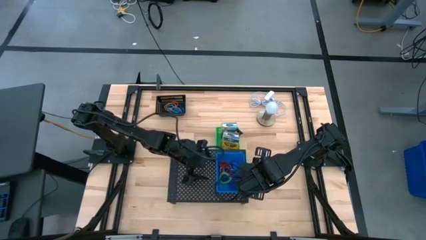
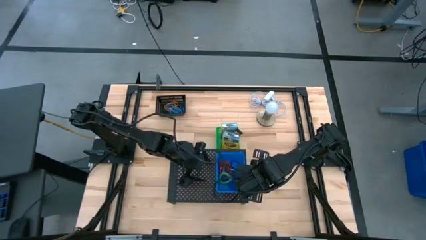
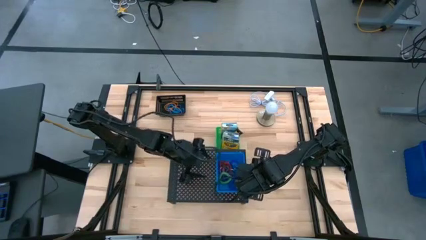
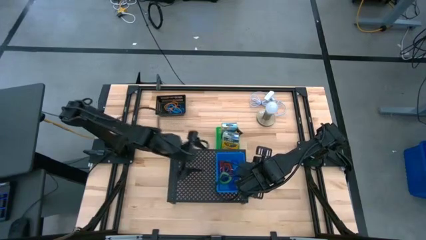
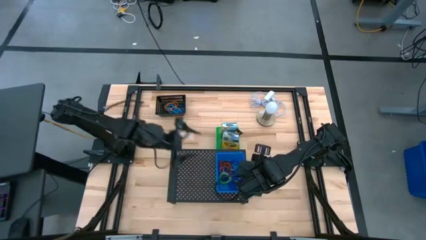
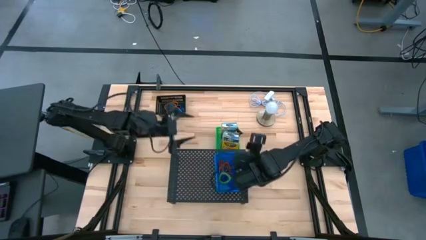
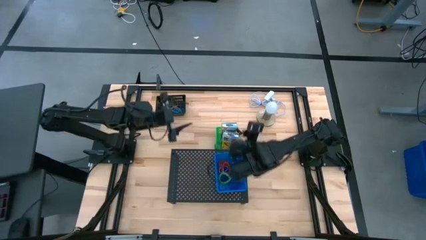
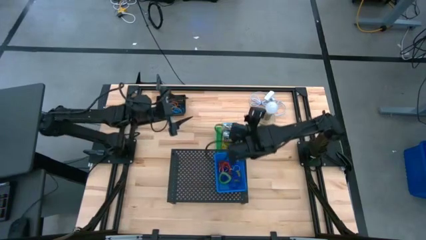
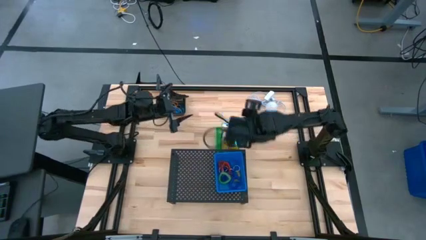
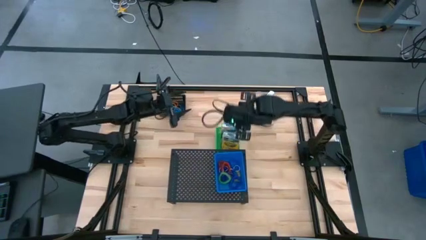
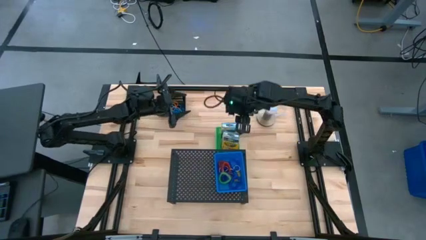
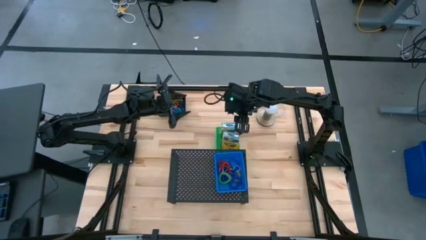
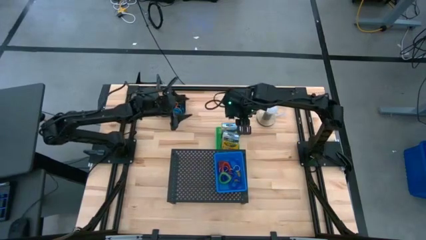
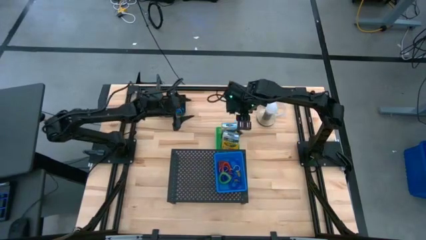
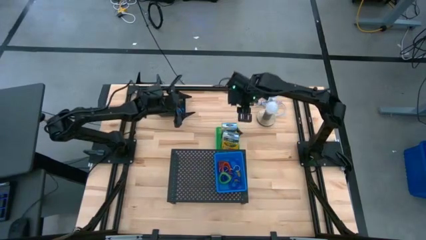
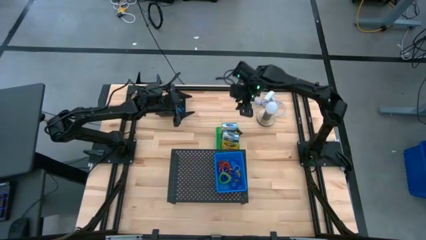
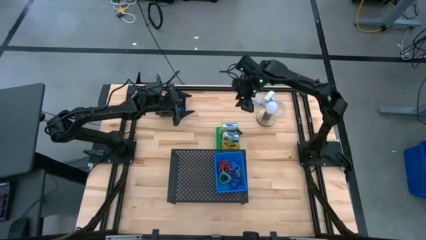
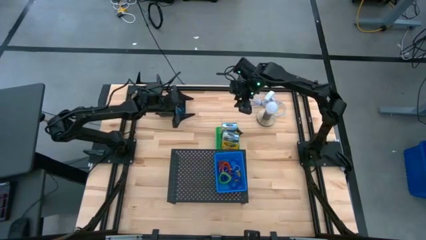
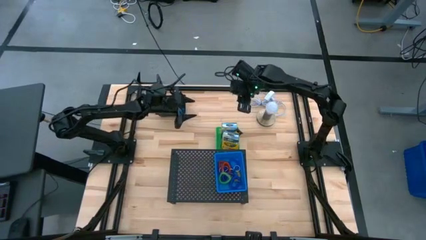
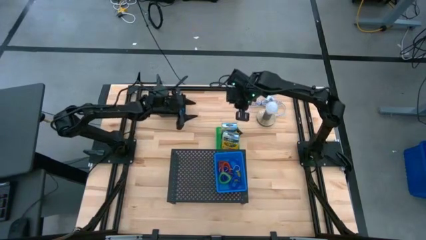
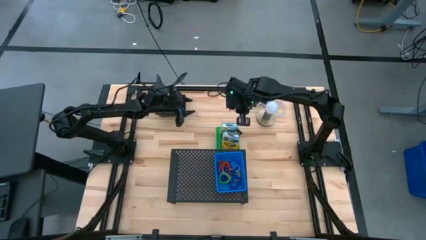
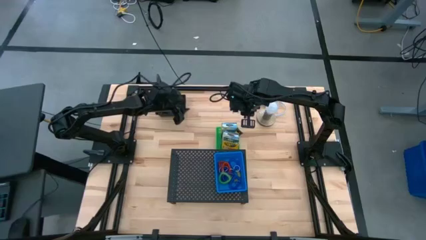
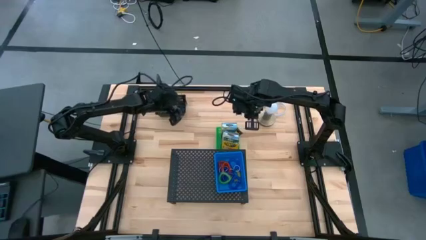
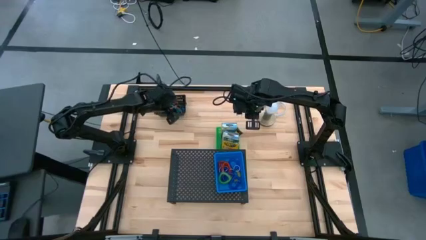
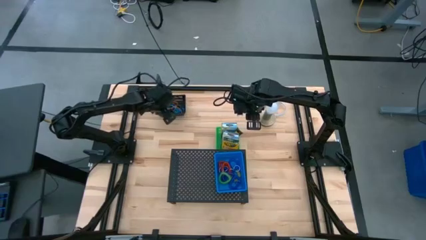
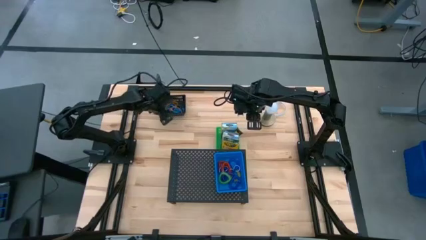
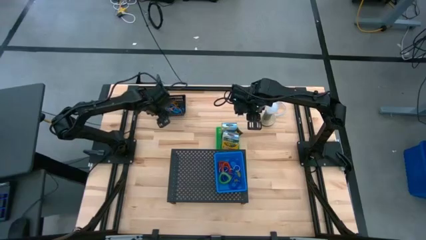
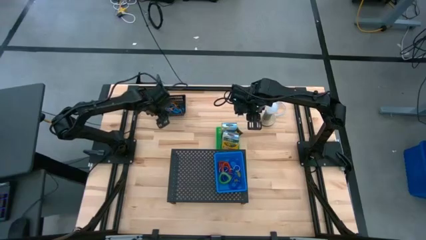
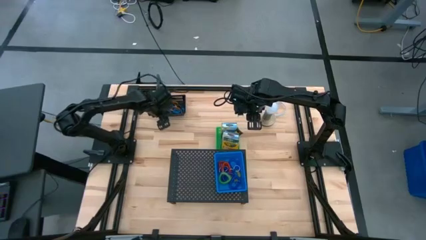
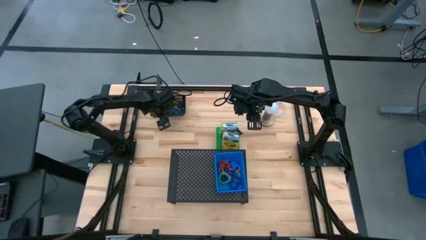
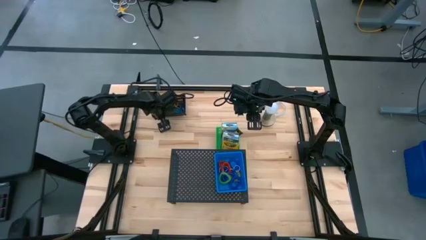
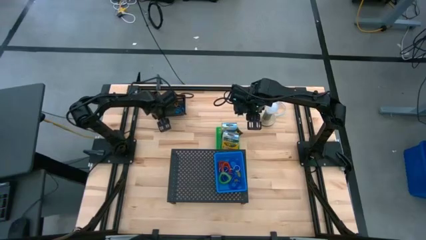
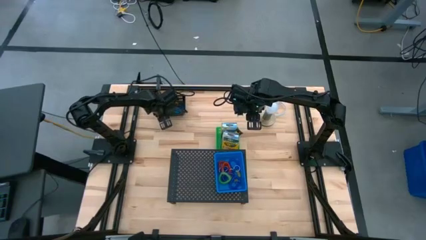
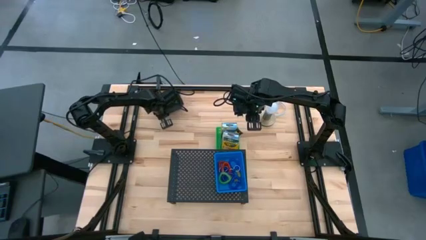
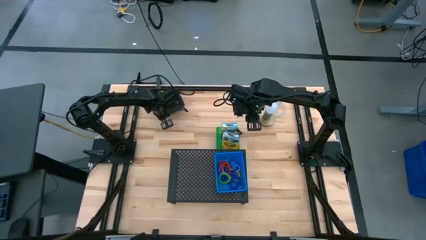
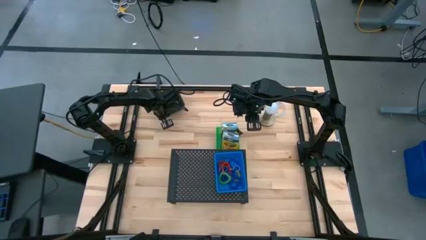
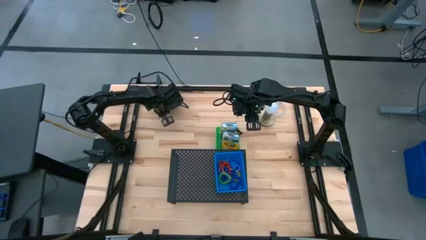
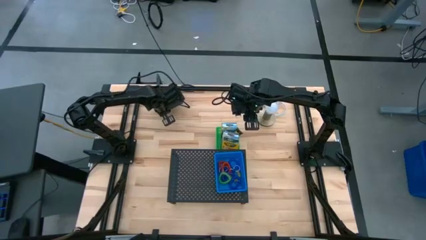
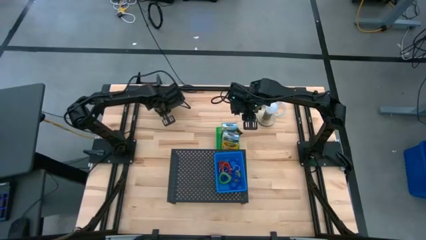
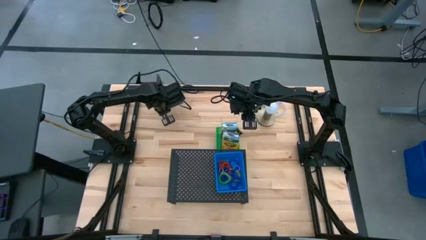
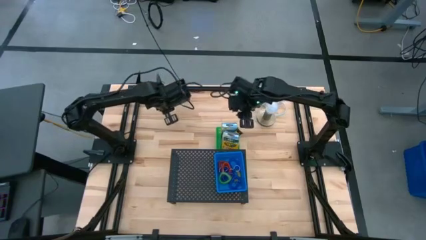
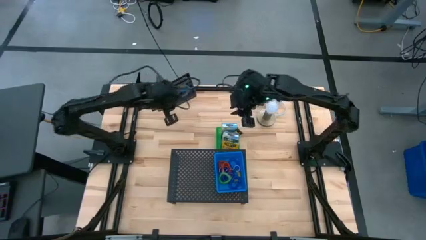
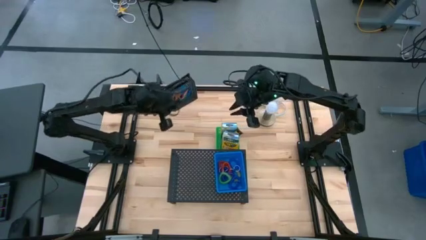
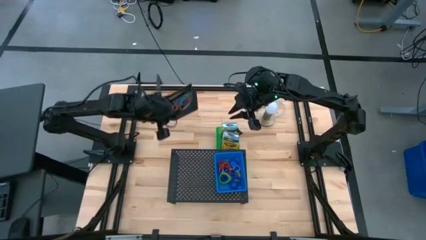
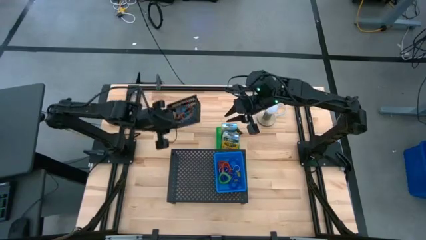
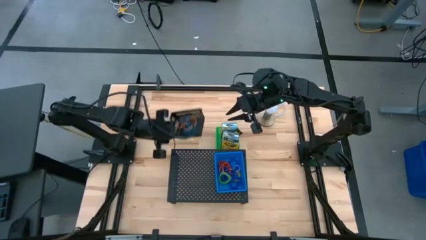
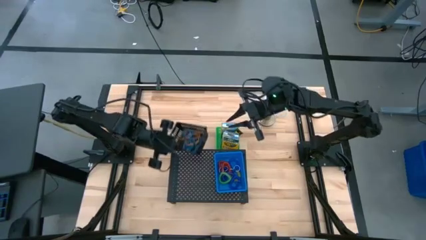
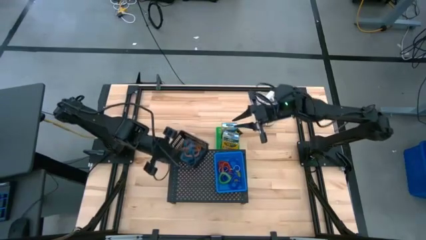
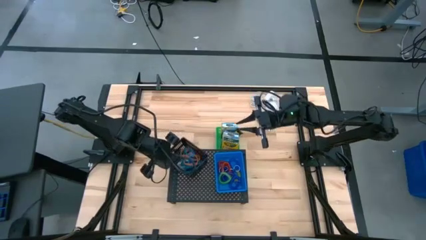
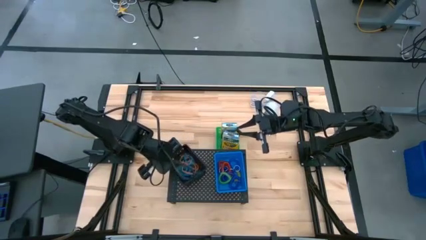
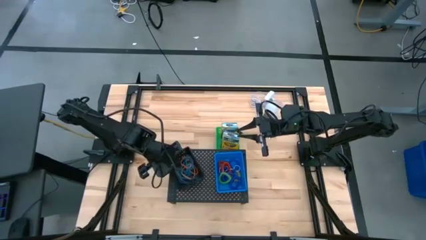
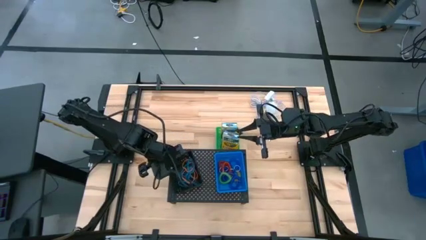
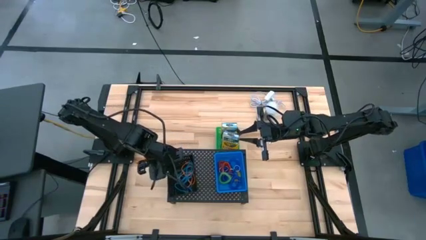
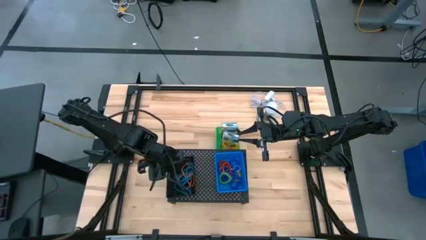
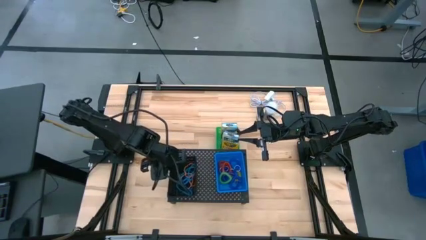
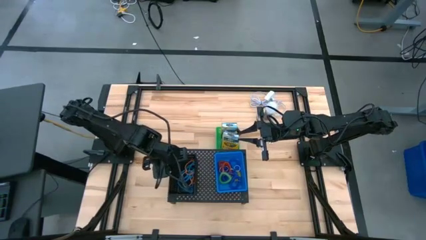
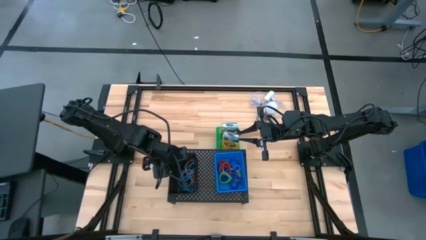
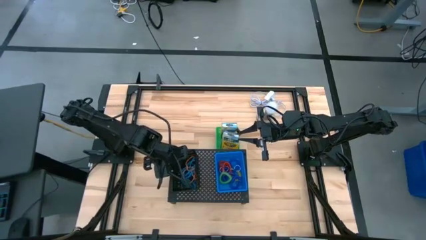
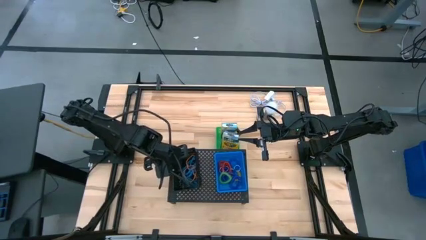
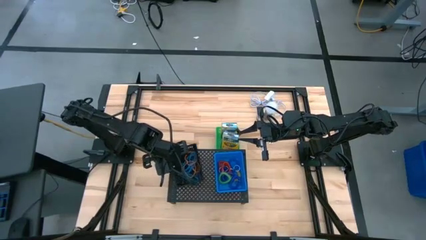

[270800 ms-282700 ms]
Task: Pick & Place Office Desk Supplies
Put the black bin with the rubber bands on the shelf

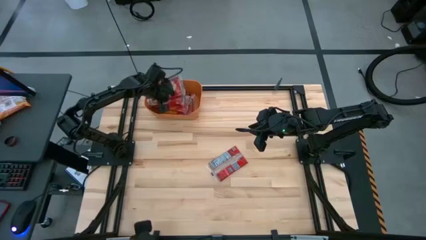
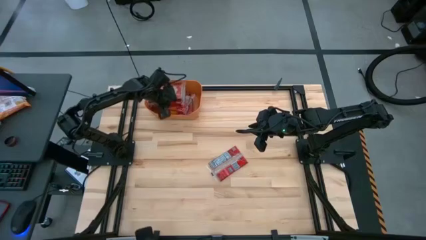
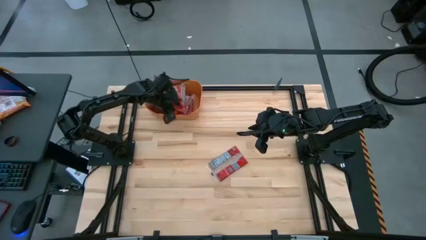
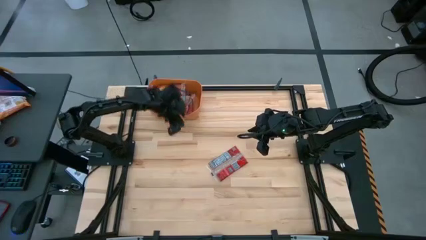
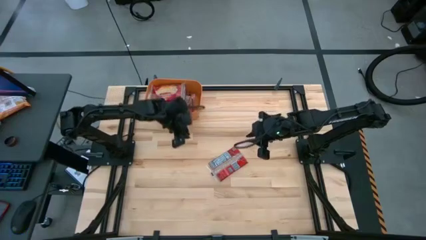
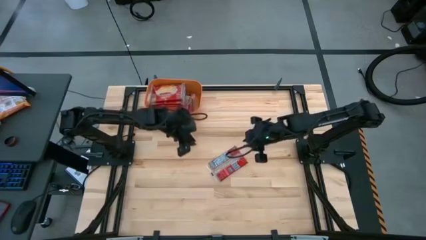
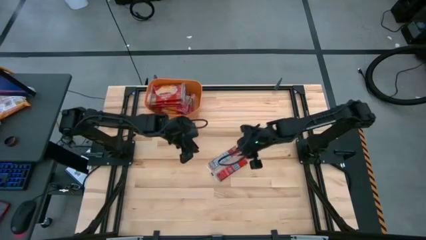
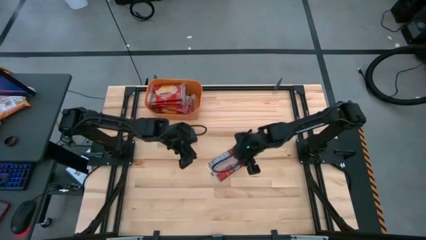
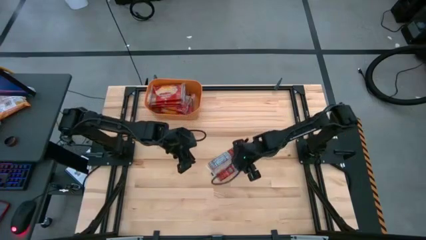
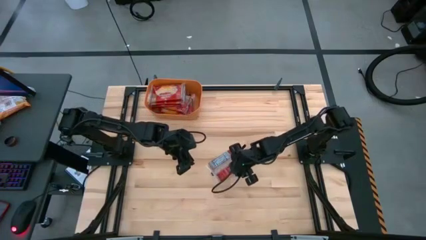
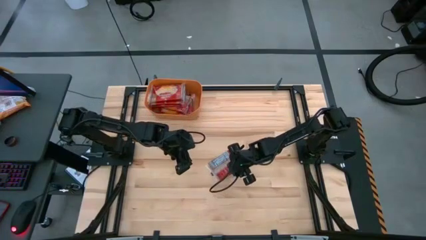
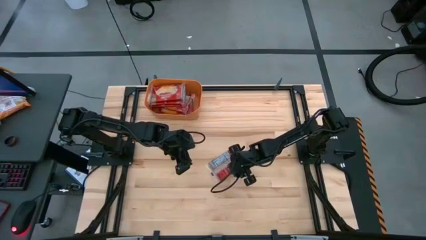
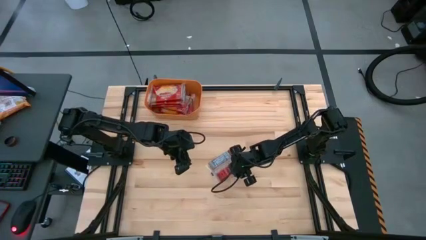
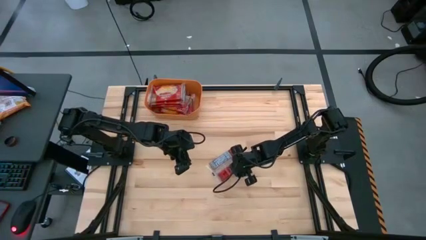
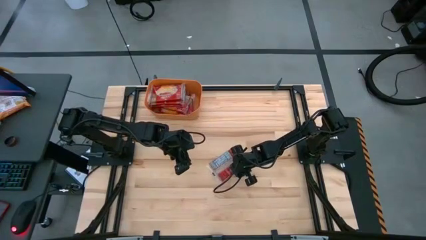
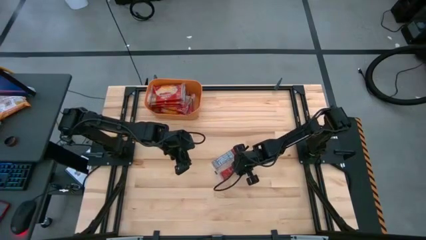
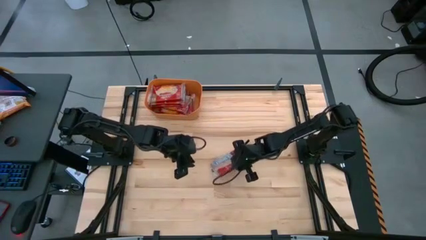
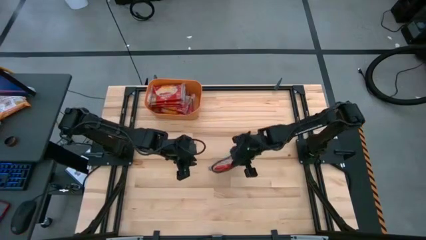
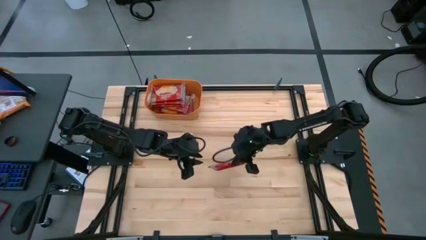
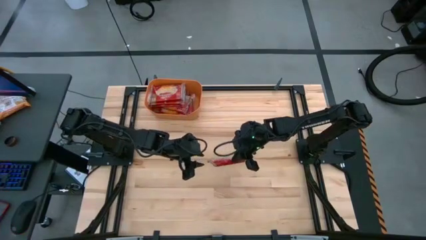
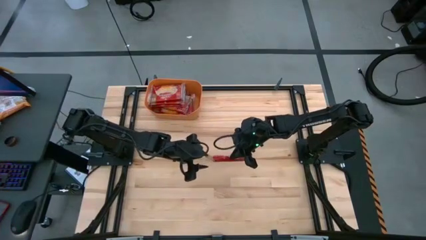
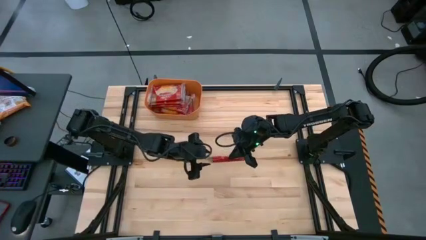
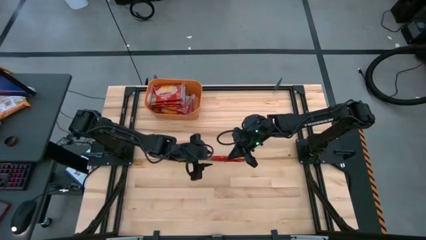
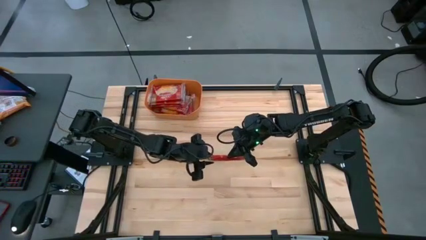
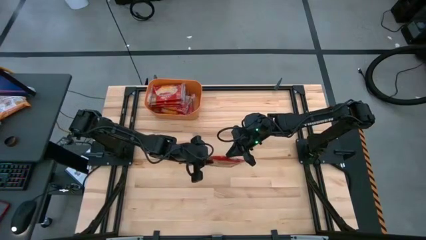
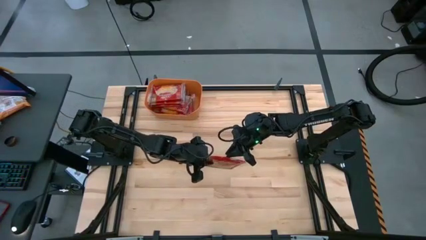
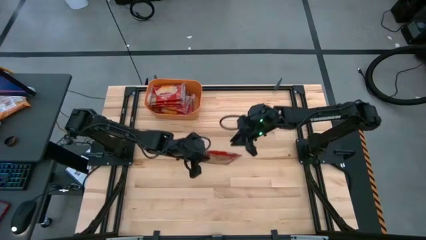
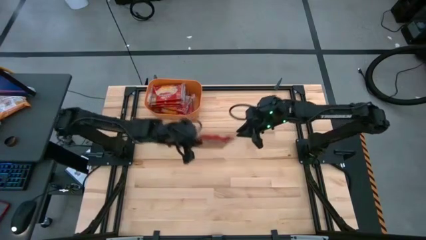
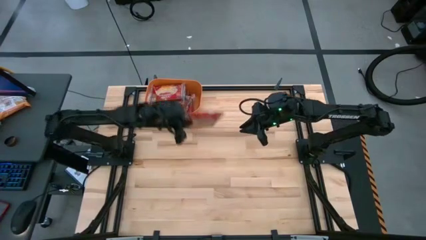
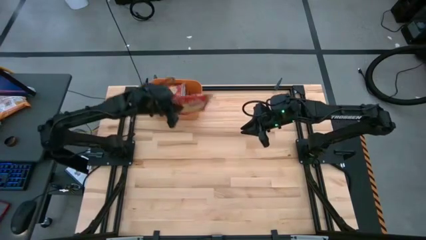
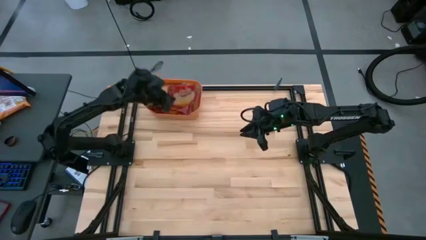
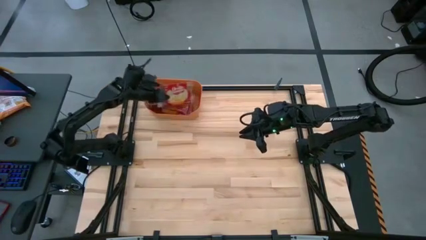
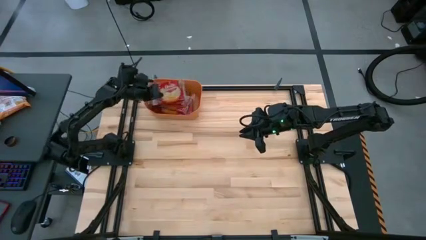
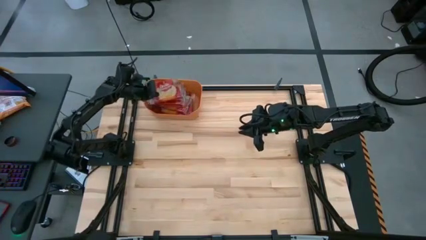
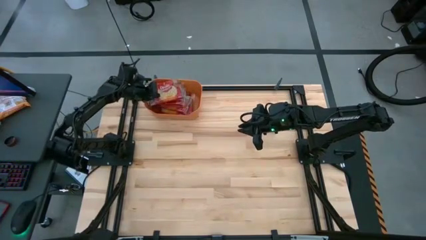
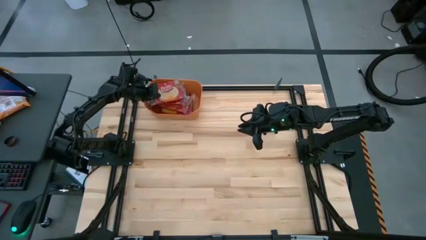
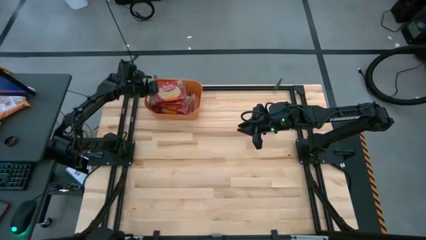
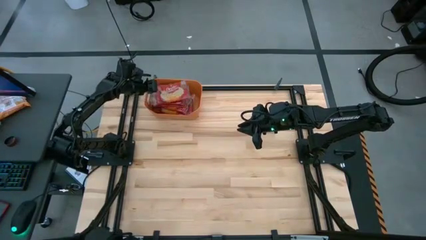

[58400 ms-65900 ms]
Task: Sort popcorn bags into baskets
Put the red popcorn bag into the orange bin
